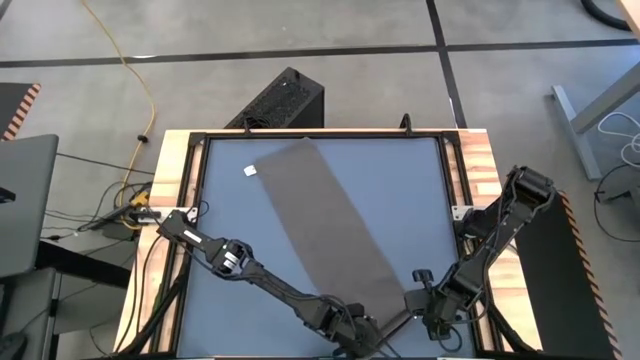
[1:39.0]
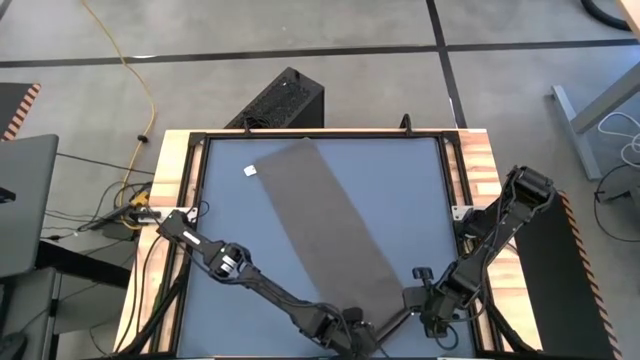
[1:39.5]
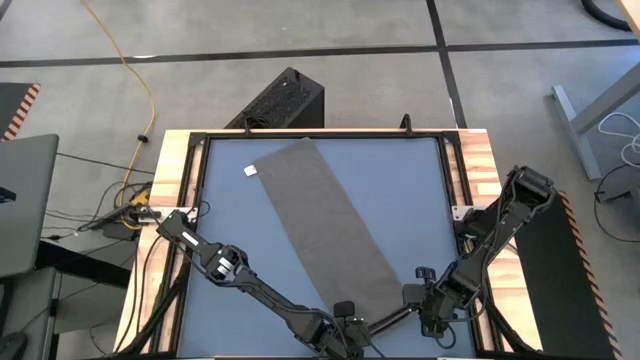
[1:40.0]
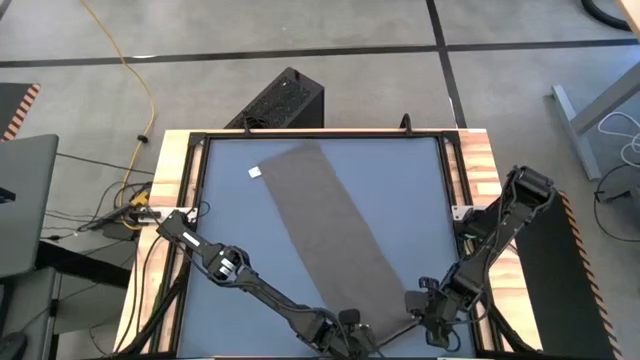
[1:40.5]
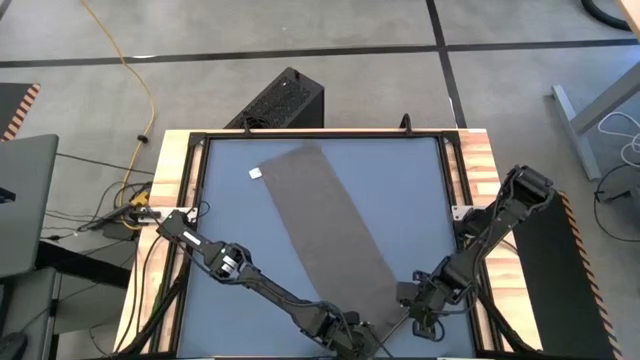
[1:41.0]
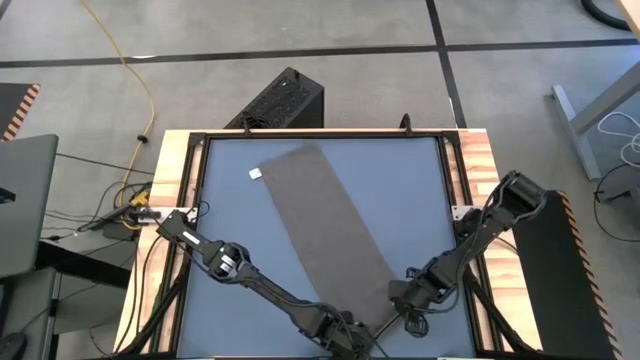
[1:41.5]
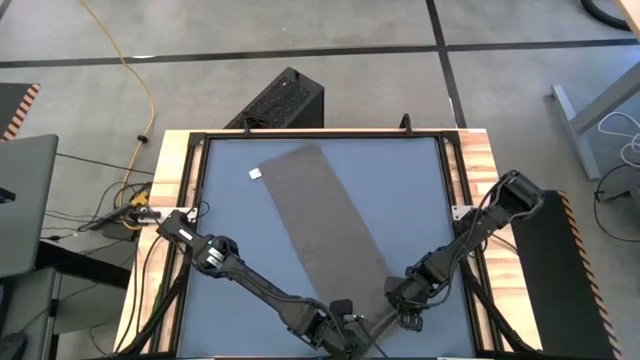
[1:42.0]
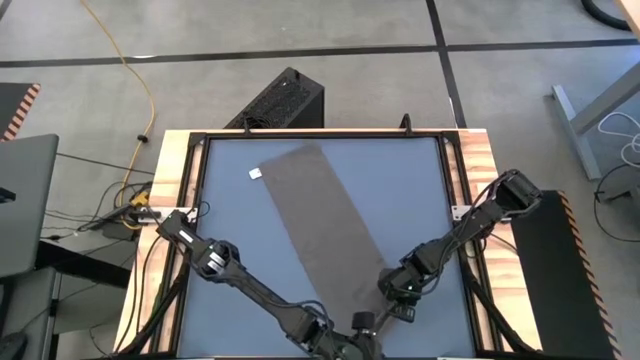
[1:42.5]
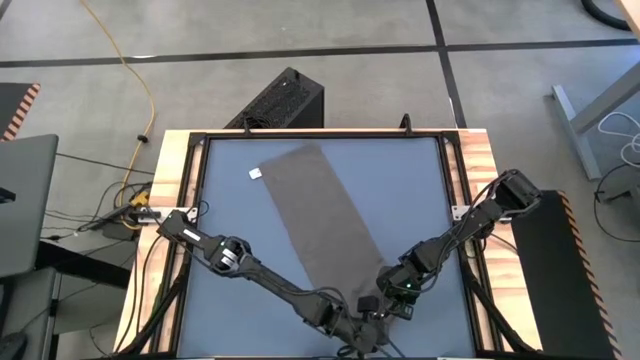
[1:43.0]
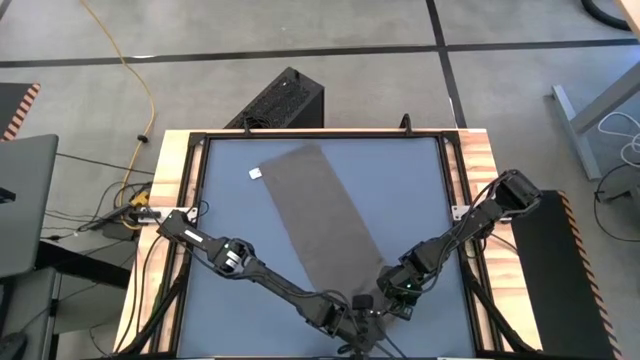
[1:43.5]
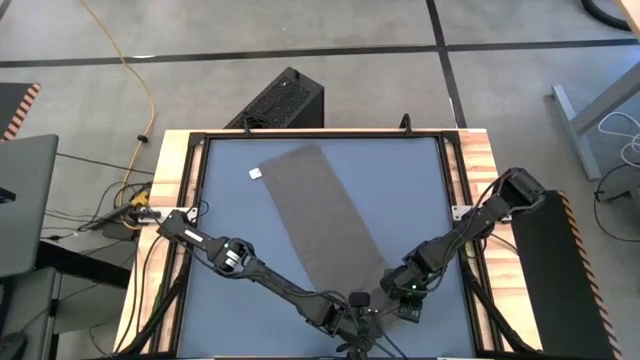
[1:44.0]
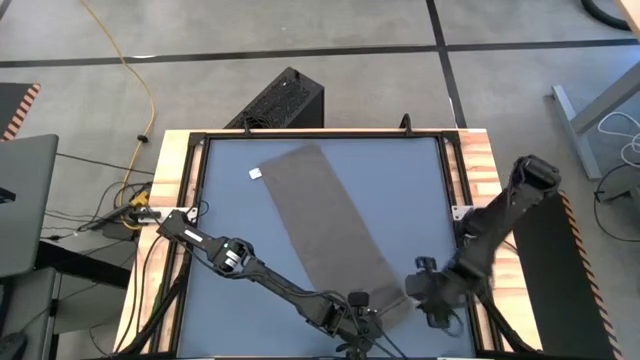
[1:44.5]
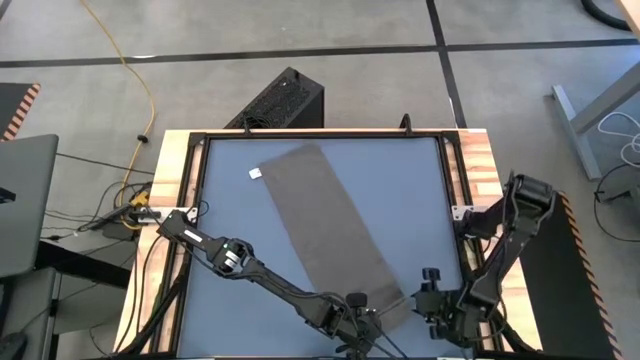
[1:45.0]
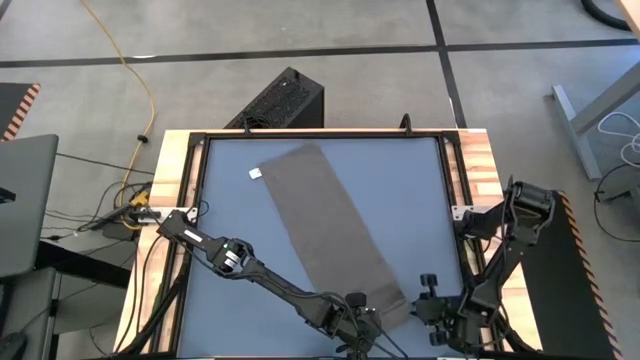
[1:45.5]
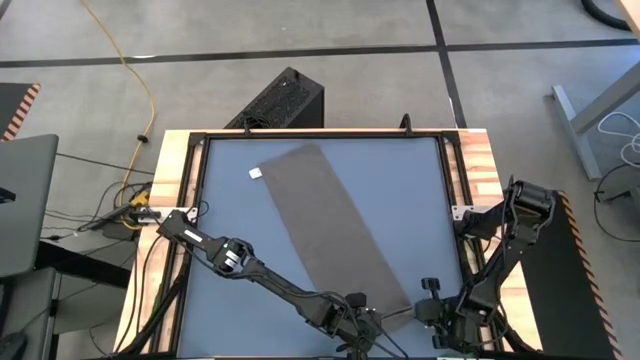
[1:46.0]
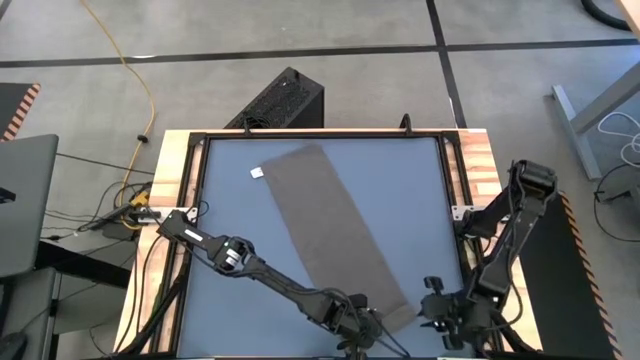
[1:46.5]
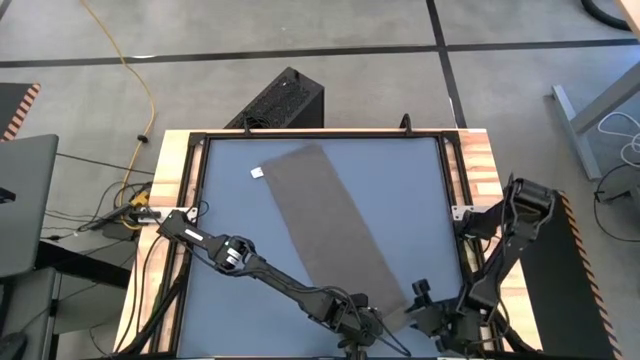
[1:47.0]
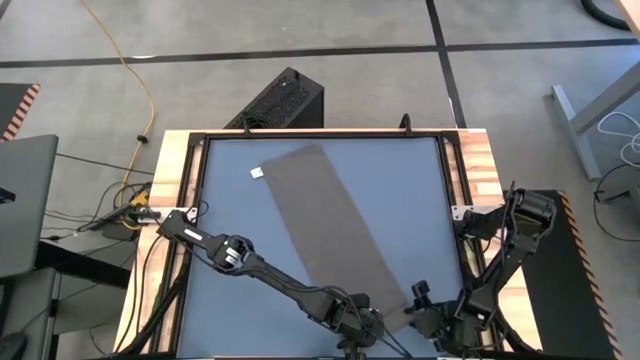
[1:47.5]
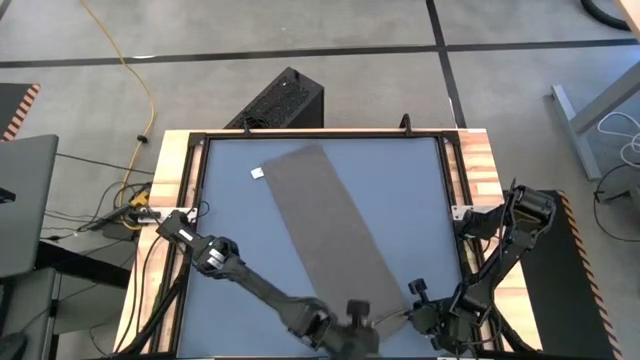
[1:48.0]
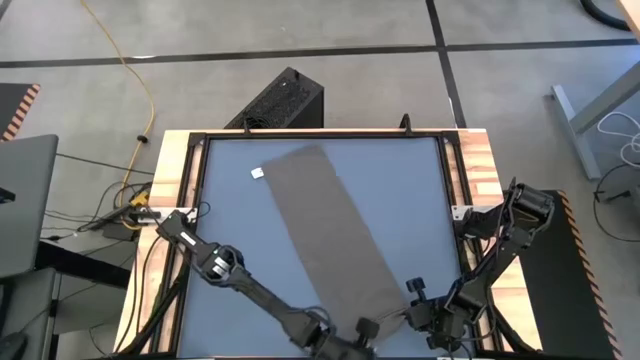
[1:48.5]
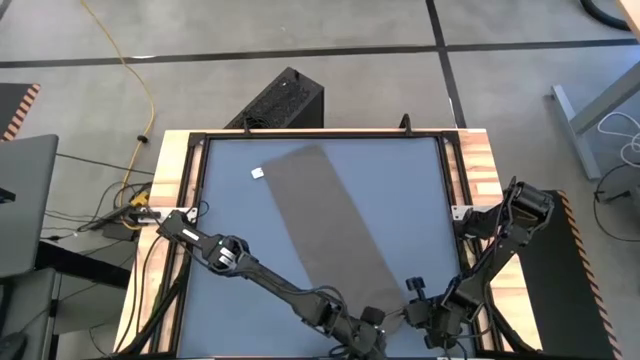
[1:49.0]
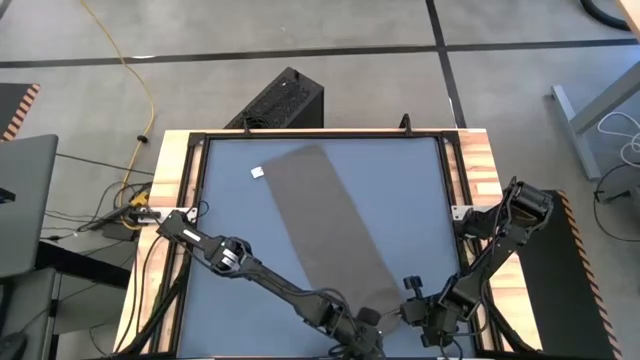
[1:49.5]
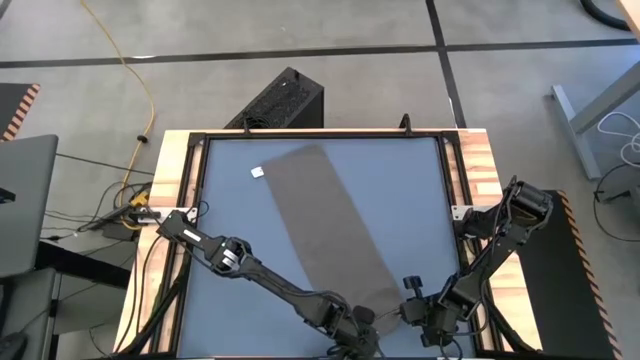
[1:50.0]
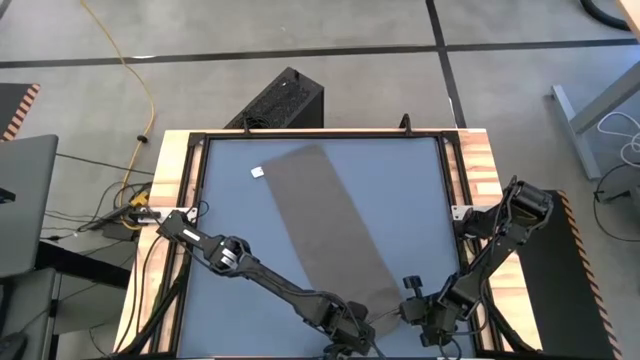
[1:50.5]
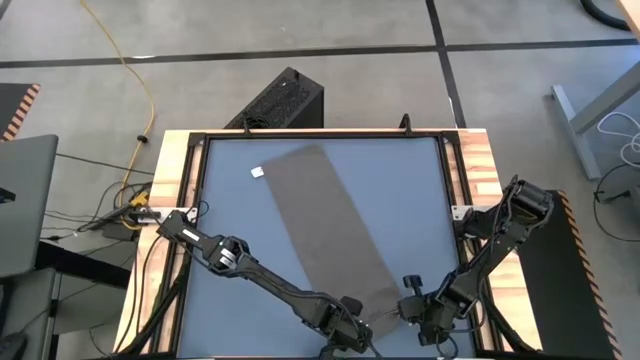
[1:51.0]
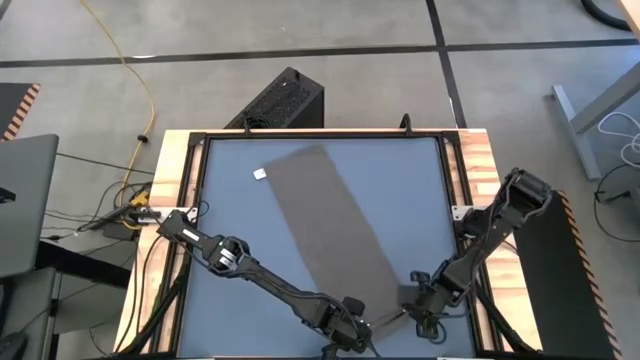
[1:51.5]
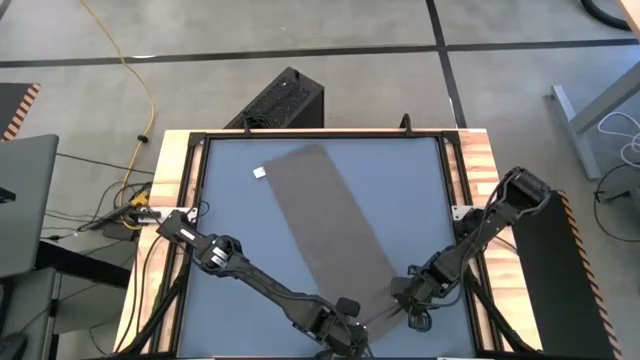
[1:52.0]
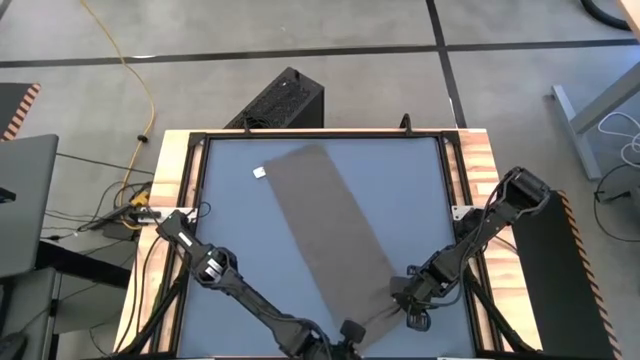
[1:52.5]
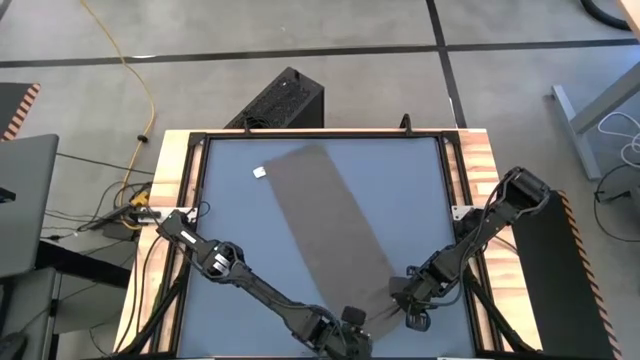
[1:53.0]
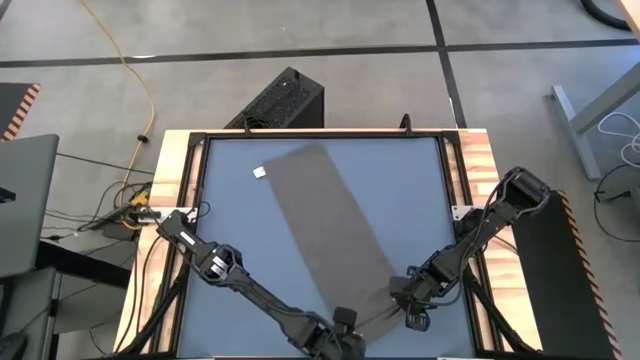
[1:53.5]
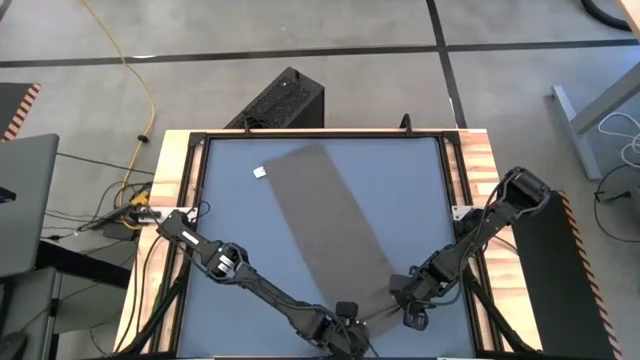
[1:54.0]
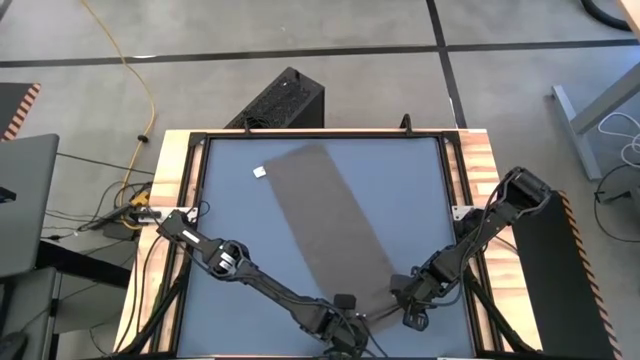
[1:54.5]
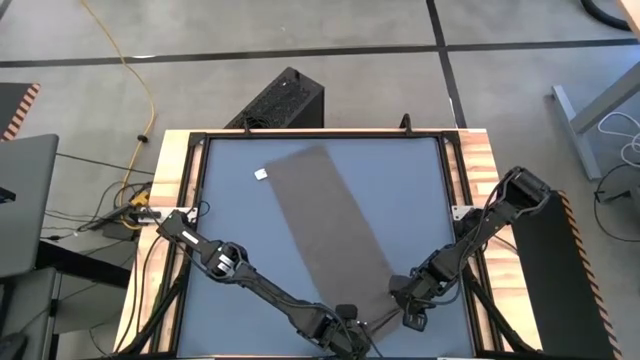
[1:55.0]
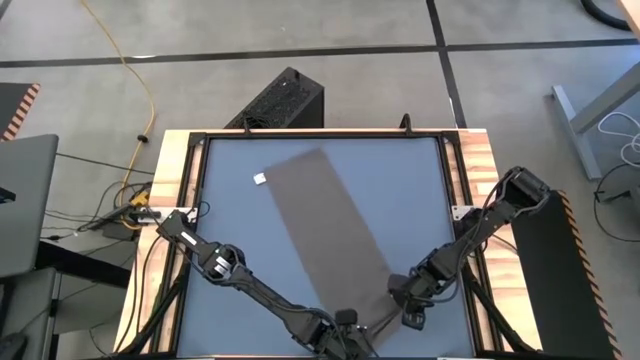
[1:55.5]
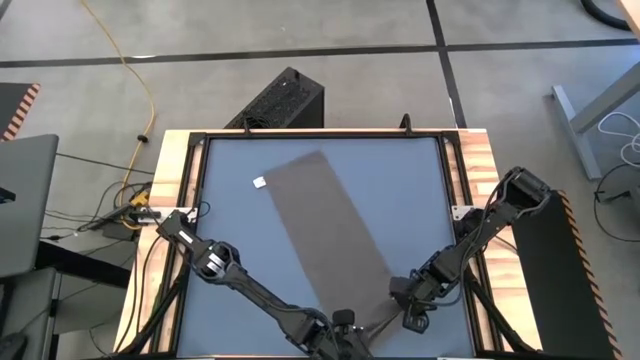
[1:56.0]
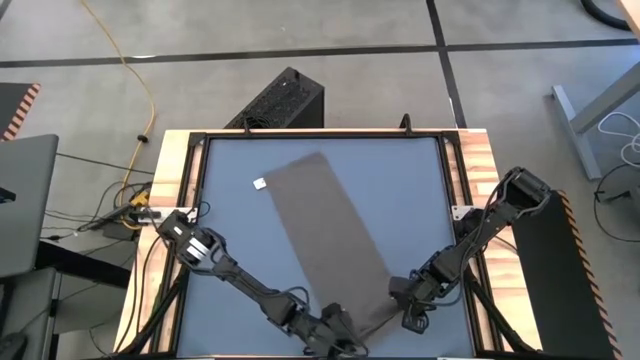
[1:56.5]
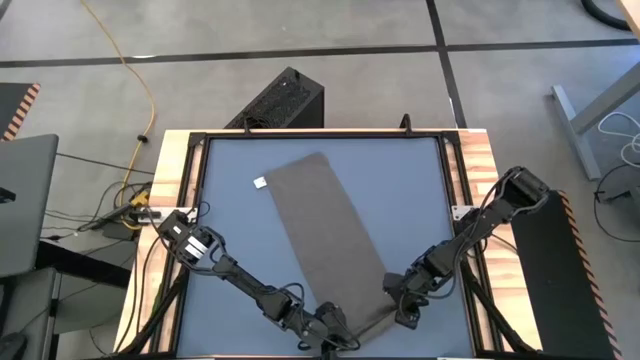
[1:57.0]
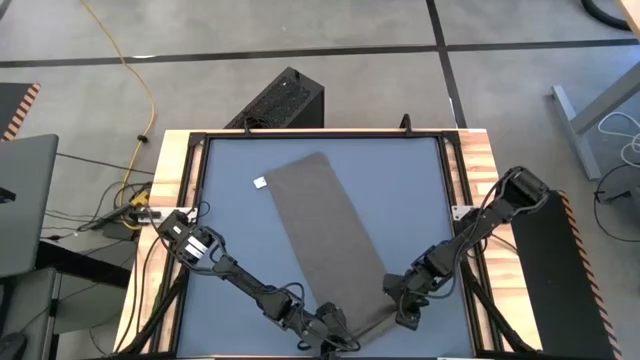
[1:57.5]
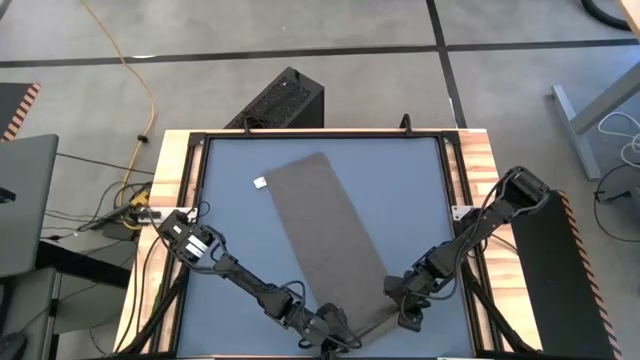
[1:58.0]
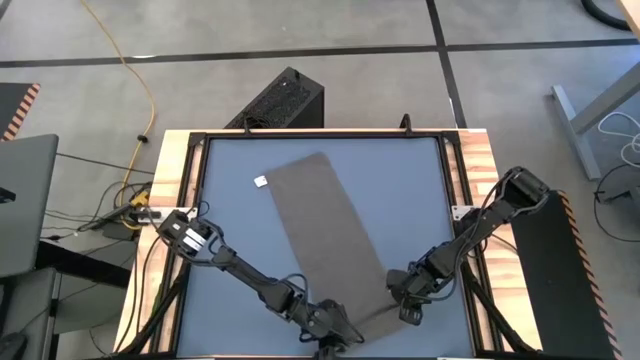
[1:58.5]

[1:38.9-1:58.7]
Task: Roll towel into tight, uniform cylinder
Roll the gray towel

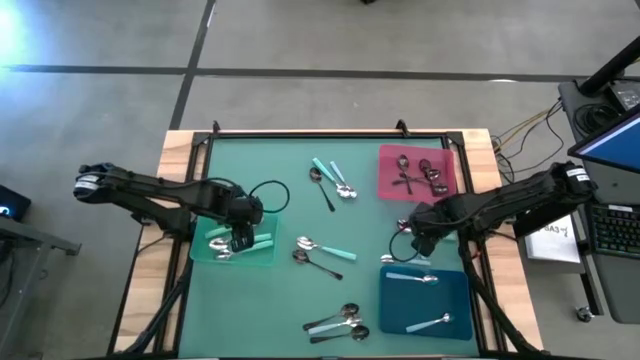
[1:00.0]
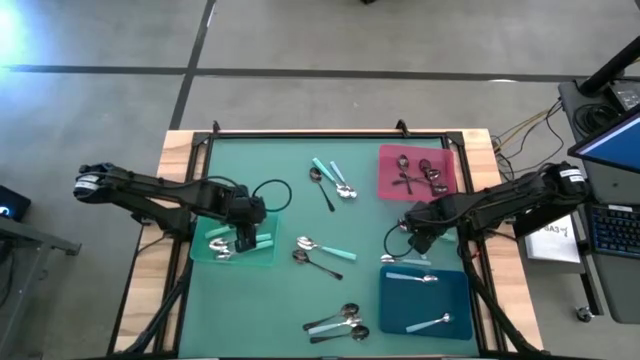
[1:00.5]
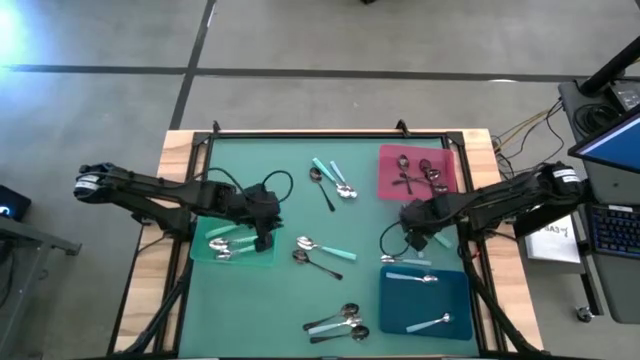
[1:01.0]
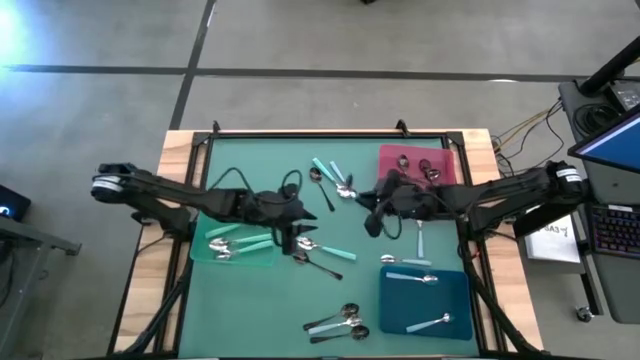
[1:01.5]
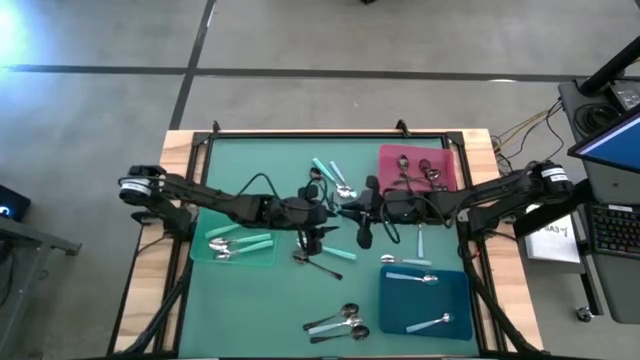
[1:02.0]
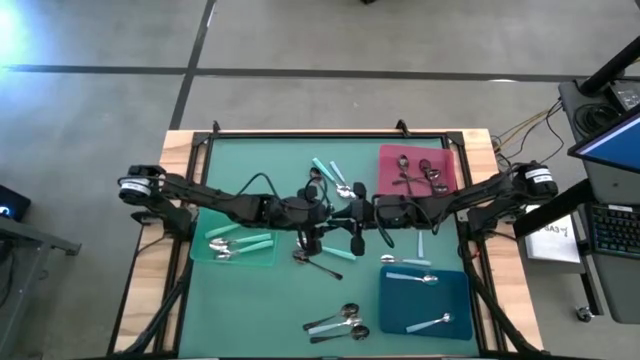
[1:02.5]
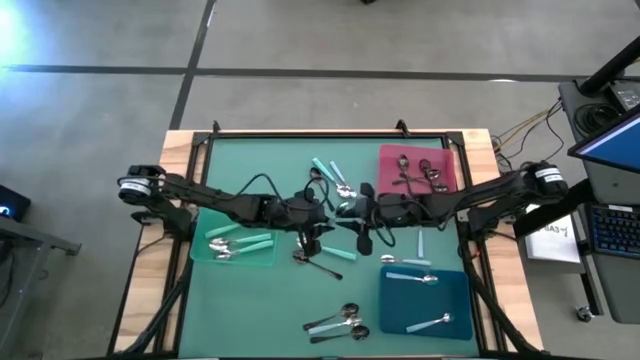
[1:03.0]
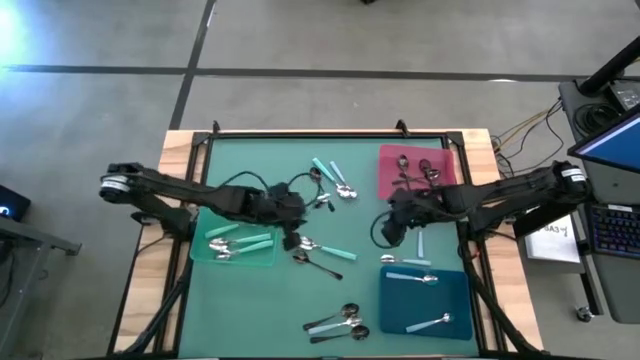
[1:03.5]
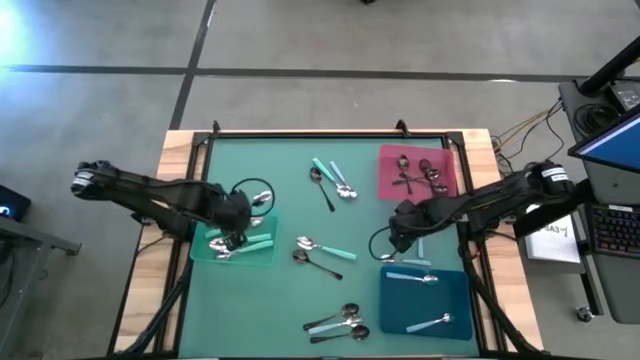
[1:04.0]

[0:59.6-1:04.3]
Task: Sort silverware by color (type)
Put the green spoon into the green bin
